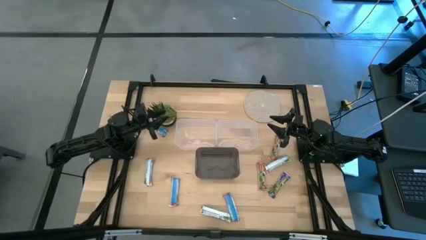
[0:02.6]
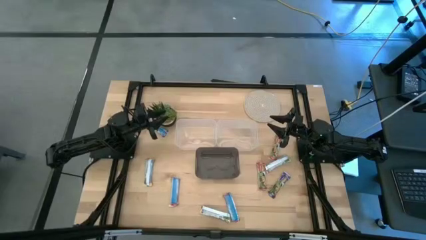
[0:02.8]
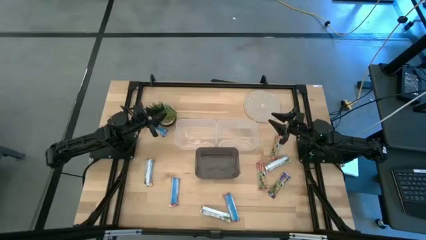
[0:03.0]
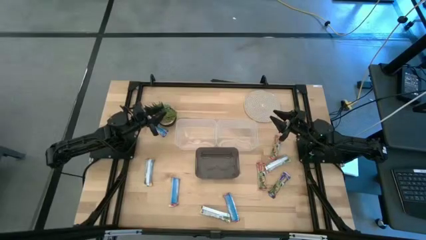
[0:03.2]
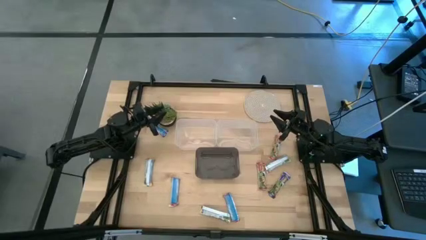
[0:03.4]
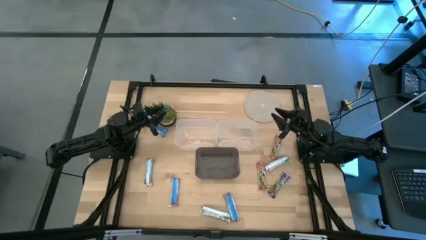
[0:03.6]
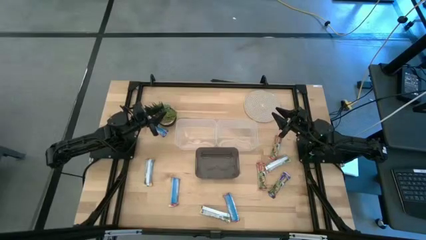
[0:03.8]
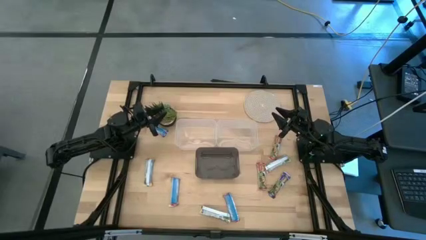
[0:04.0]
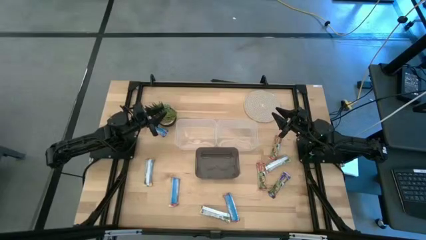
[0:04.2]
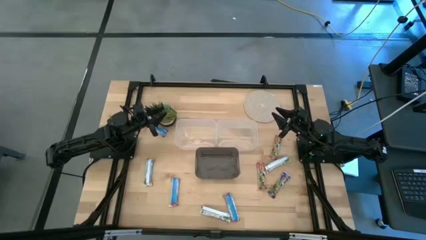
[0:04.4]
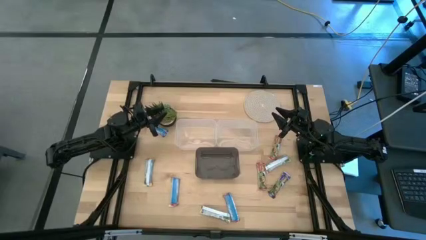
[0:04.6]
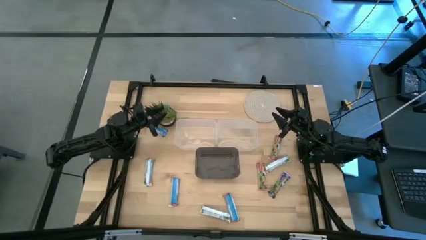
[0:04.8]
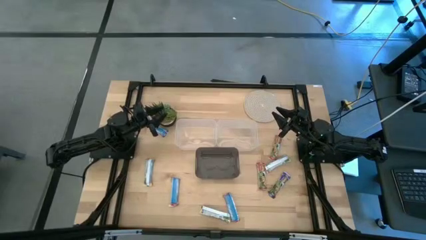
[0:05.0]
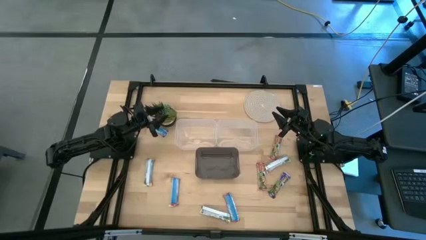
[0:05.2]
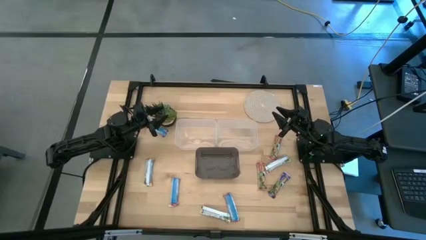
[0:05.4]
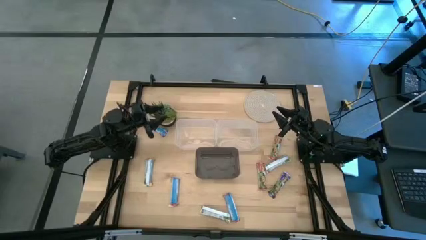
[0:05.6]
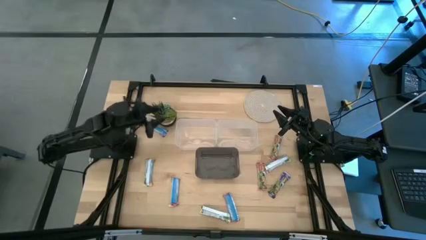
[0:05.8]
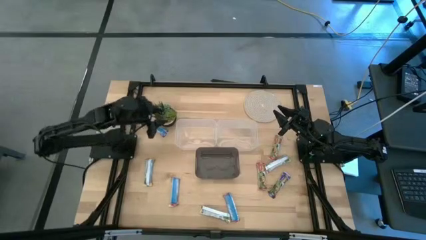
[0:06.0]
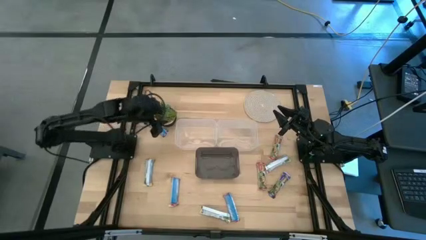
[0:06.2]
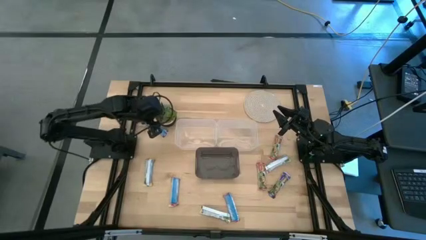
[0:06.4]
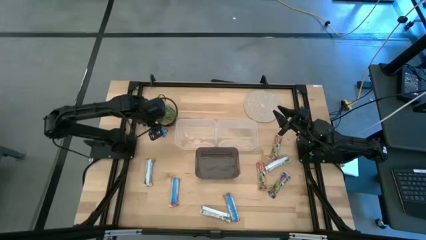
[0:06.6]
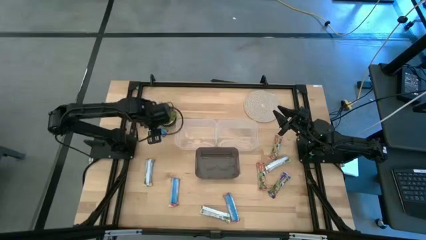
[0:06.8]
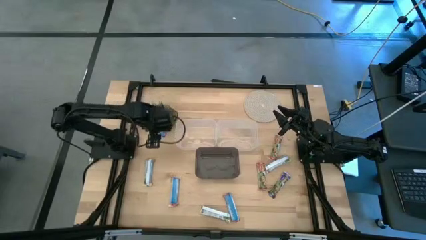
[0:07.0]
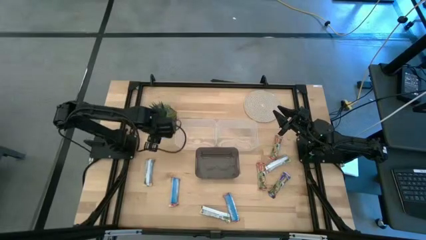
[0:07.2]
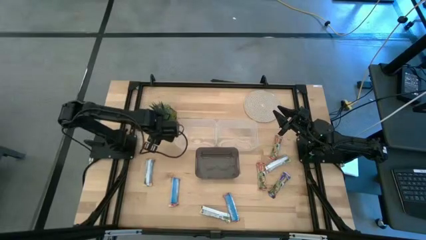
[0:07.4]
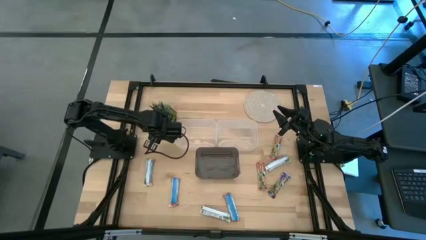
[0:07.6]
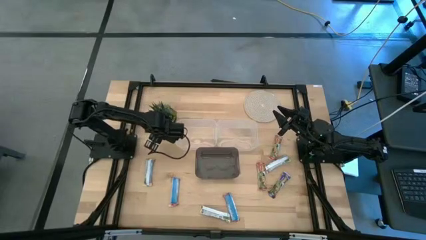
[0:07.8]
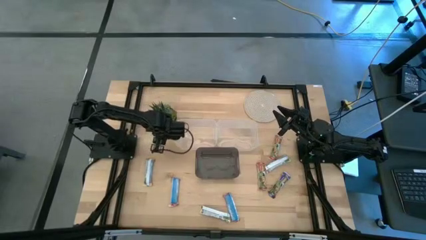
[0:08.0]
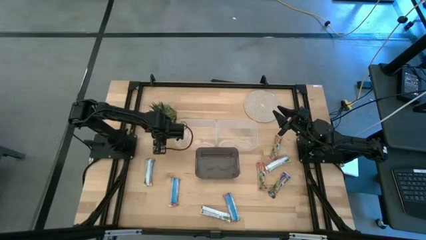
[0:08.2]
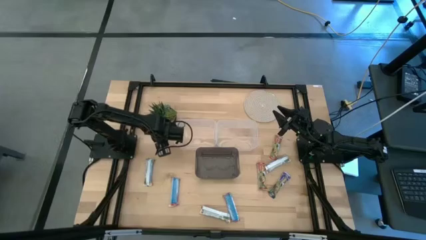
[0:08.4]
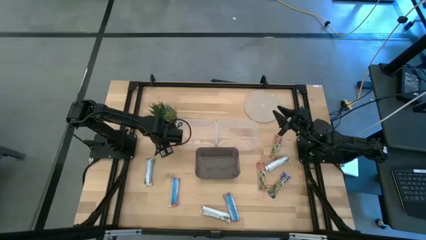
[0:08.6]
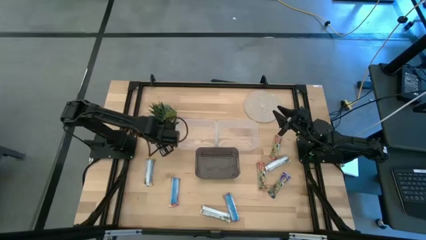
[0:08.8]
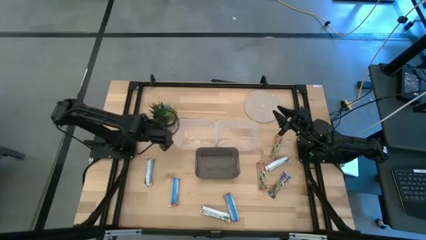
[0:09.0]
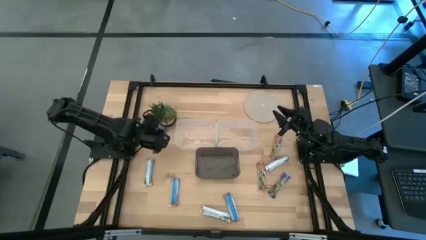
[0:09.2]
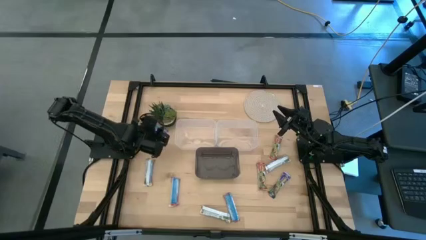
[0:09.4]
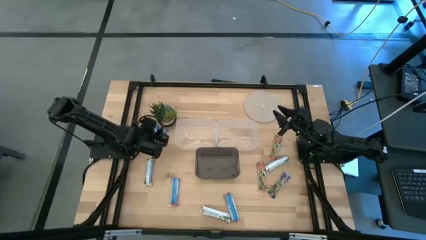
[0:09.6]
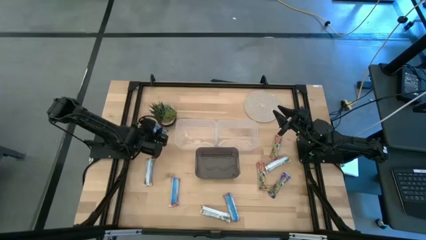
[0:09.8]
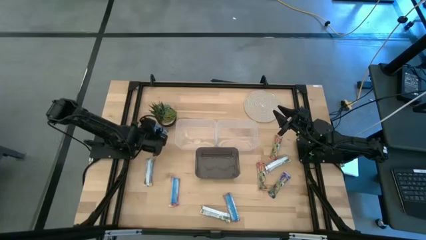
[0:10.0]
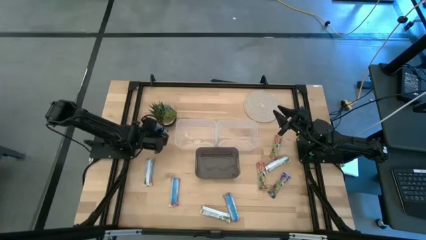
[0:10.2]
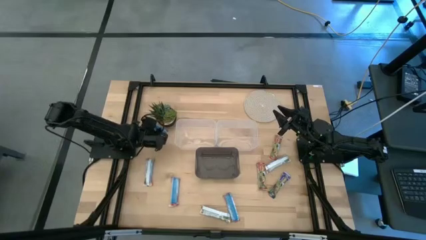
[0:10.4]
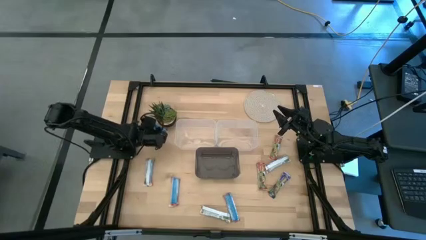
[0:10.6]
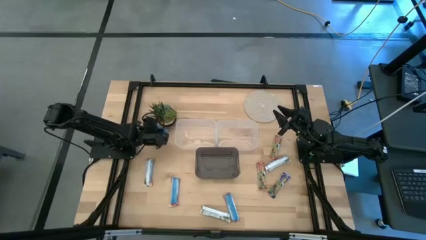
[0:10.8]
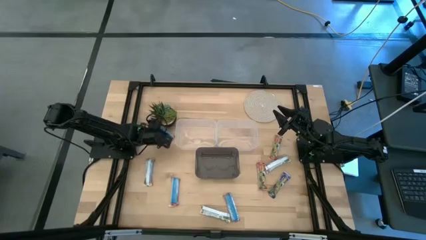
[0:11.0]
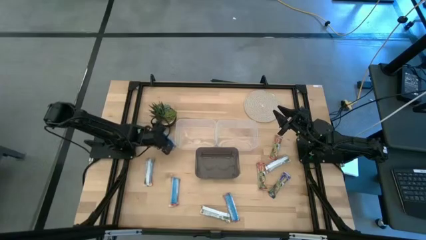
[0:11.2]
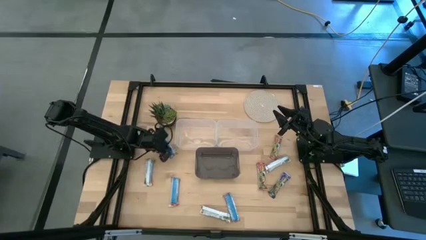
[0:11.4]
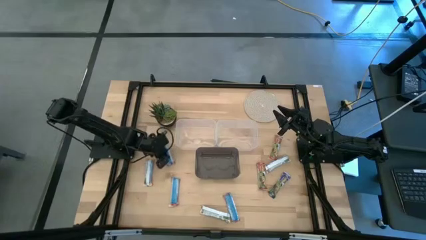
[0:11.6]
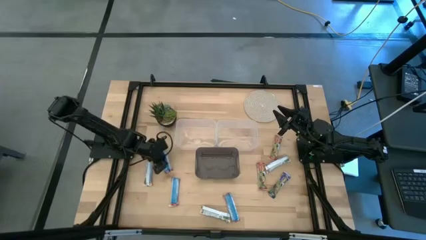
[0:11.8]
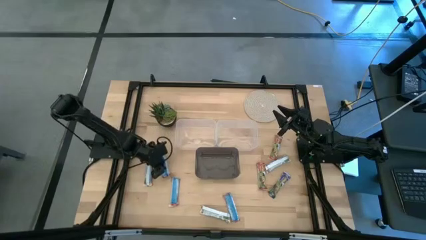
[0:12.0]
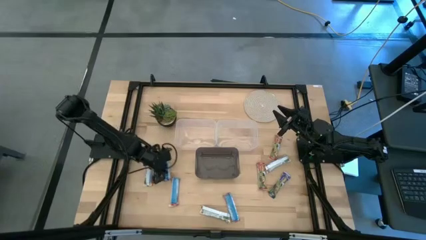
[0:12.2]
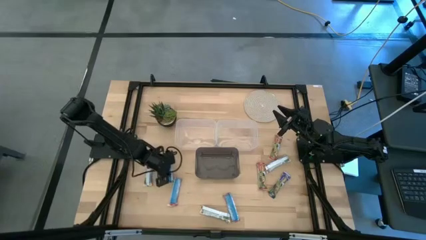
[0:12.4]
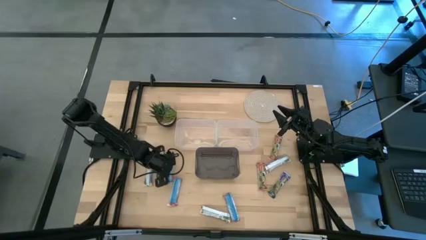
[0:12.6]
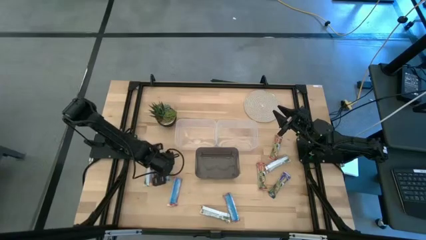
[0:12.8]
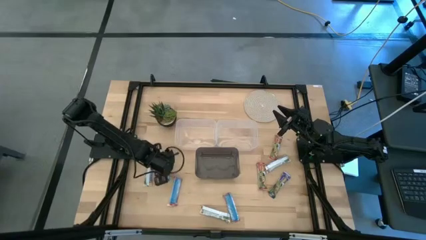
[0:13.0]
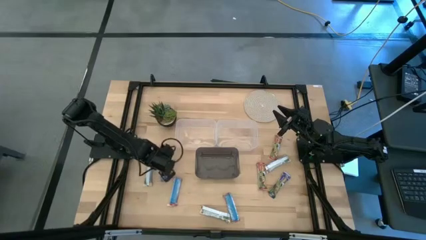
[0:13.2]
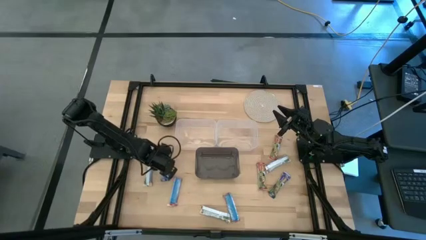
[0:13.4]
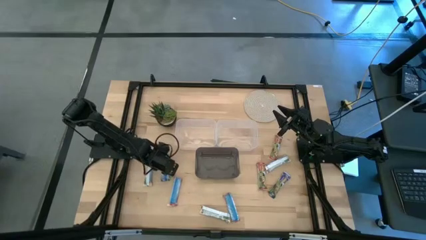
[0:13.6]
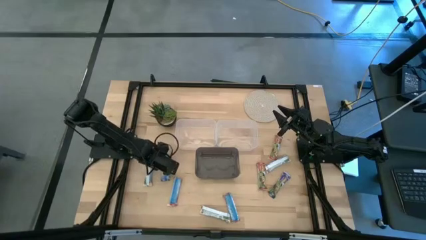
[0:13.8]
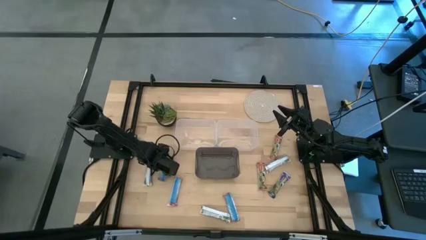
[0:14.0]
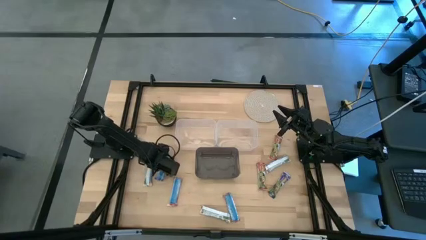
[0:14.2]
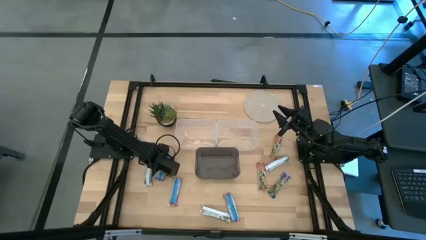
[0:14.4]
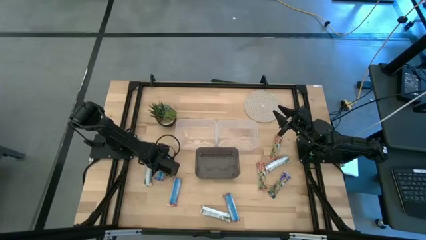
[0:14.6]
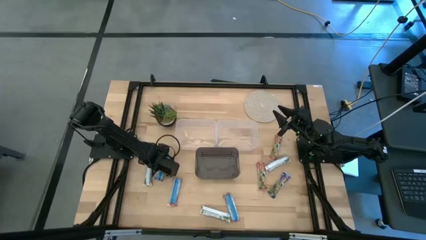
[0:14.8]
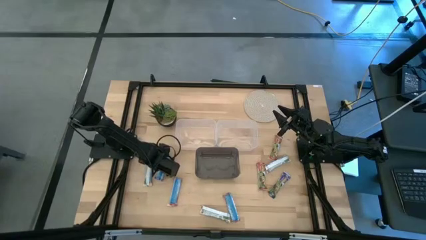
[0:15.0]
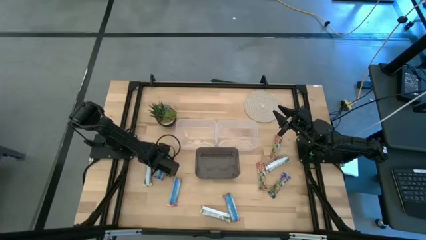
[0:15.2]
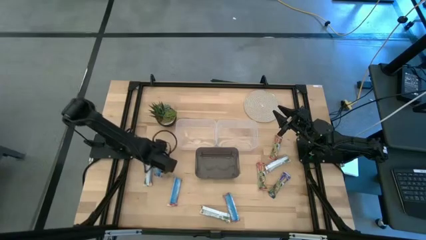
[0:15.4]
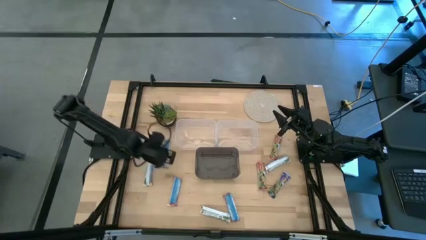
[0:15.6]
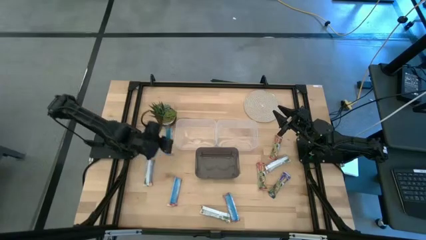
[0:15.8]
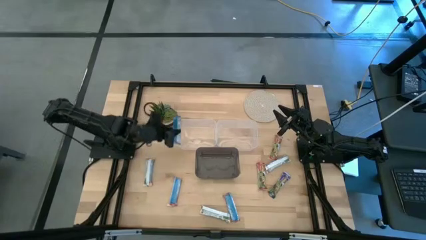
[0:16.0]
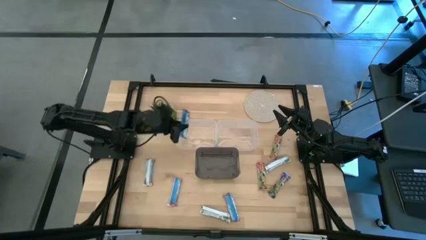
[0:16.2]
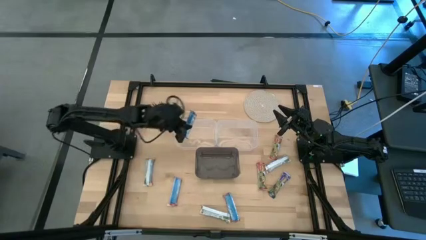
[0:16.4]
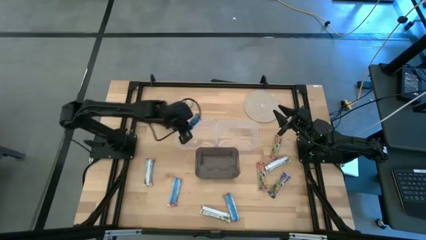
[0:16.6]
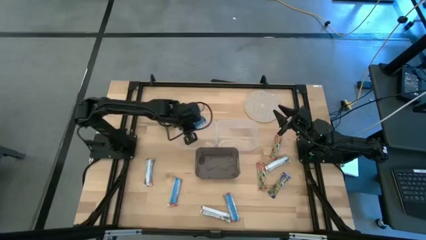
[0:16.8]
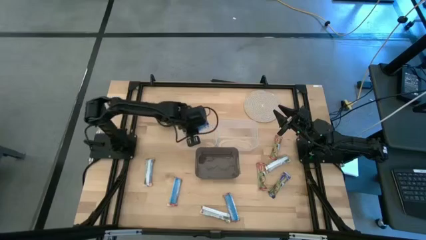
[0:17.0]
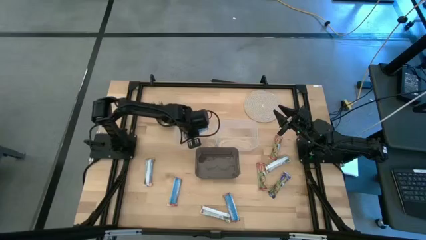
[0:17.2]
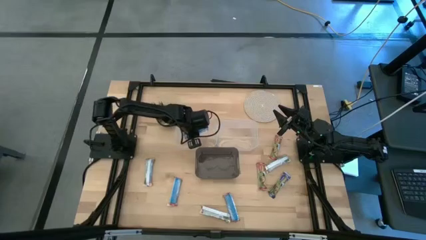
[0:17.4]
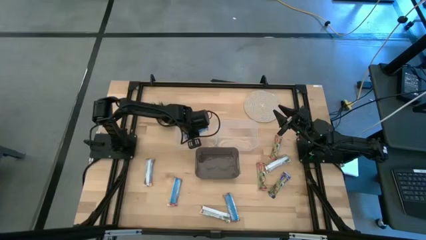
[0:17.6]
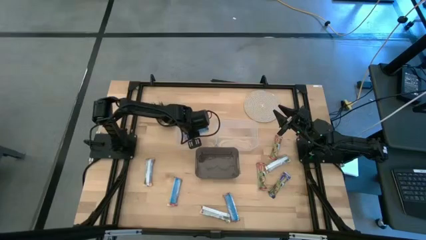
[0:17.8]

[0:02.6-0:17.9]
Task: Pick and place Granola Bars by type
Put the blue granola bar into the left transparent bin
